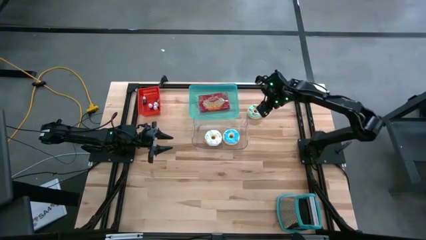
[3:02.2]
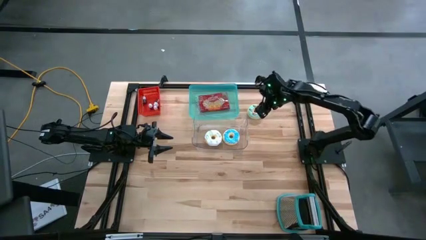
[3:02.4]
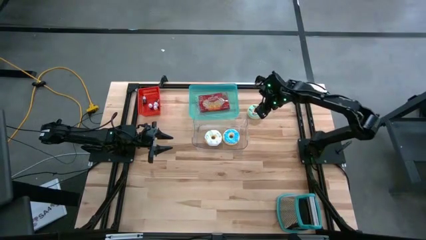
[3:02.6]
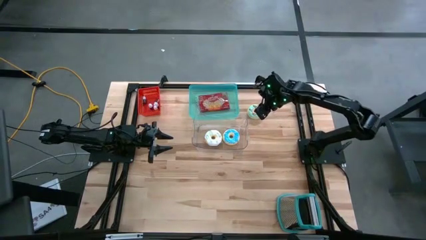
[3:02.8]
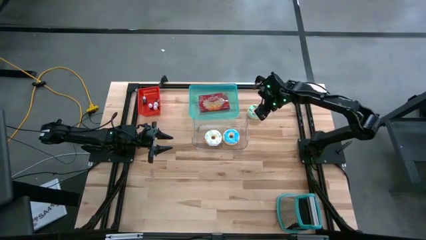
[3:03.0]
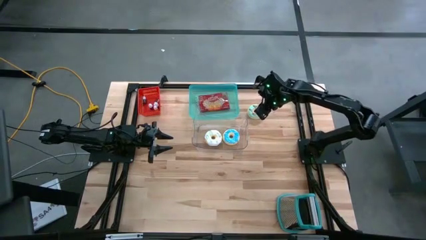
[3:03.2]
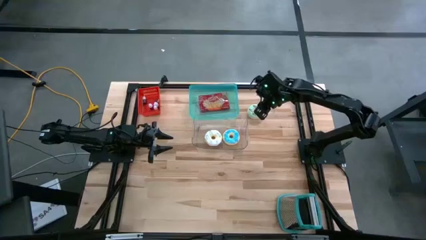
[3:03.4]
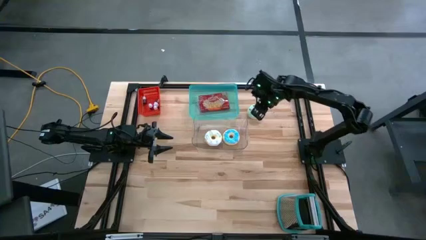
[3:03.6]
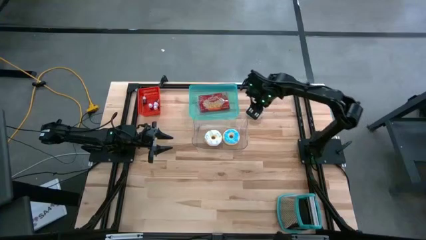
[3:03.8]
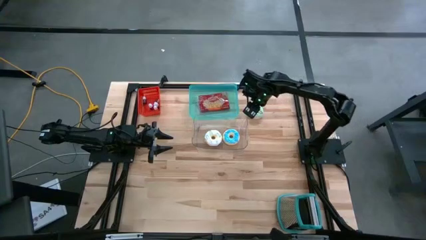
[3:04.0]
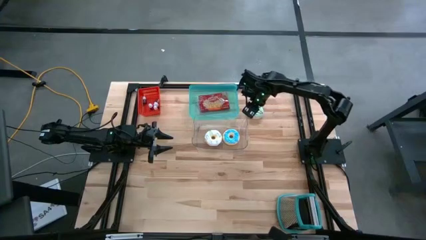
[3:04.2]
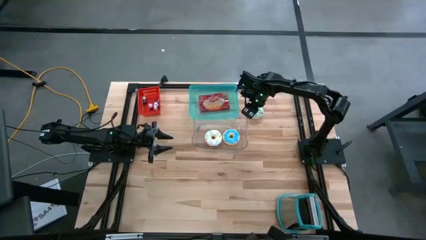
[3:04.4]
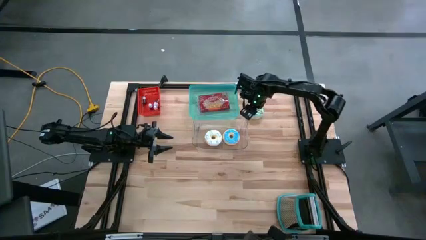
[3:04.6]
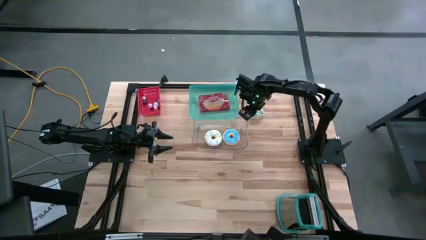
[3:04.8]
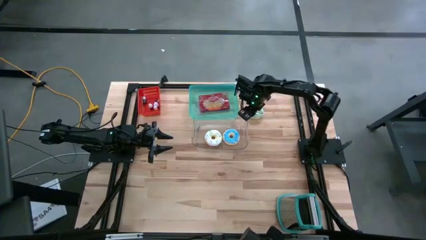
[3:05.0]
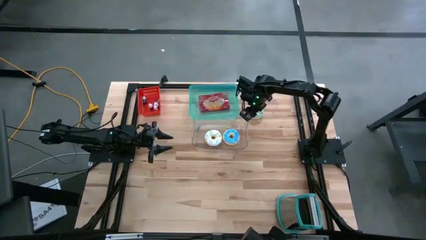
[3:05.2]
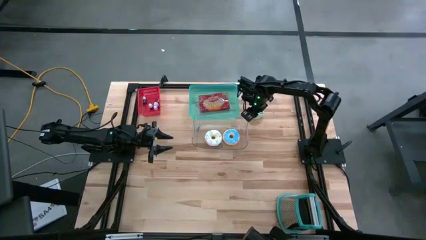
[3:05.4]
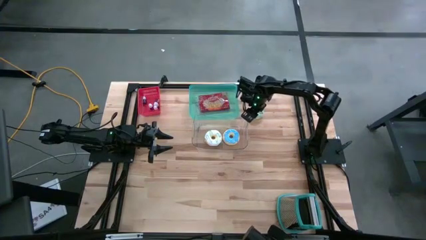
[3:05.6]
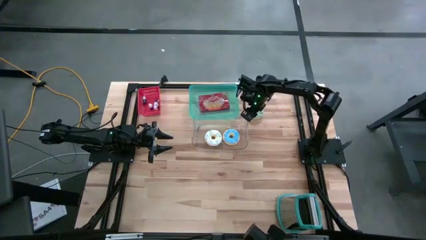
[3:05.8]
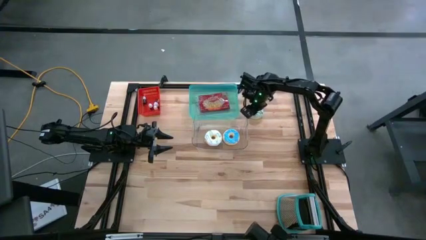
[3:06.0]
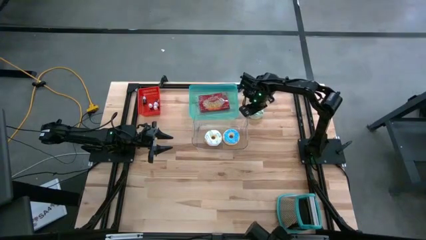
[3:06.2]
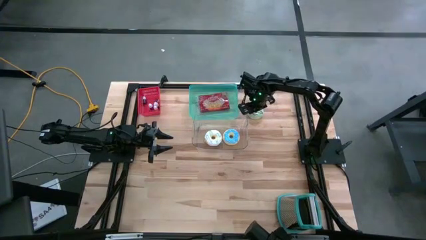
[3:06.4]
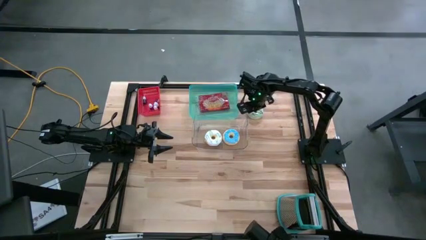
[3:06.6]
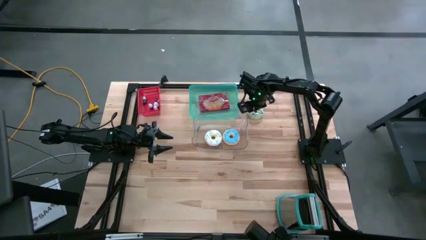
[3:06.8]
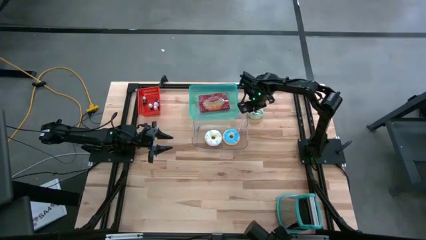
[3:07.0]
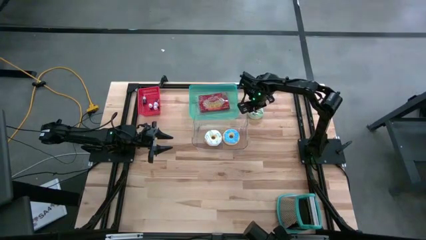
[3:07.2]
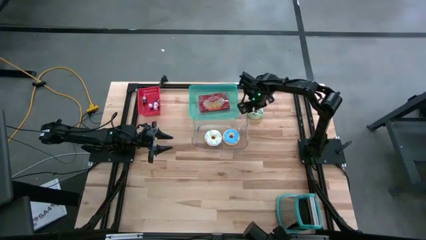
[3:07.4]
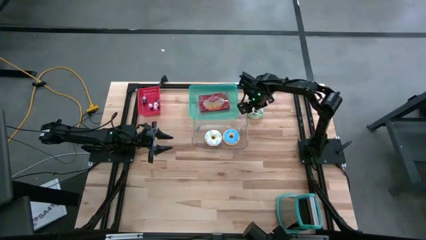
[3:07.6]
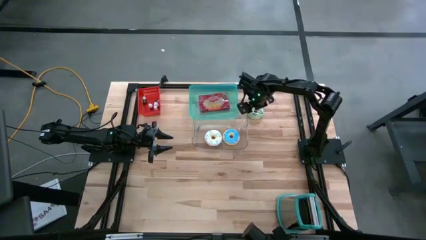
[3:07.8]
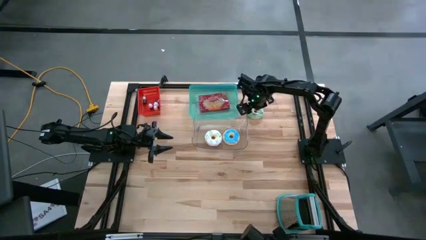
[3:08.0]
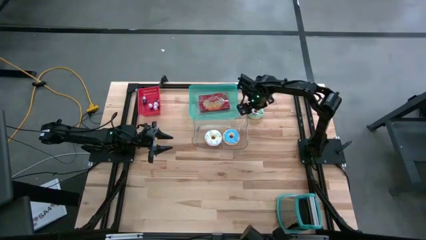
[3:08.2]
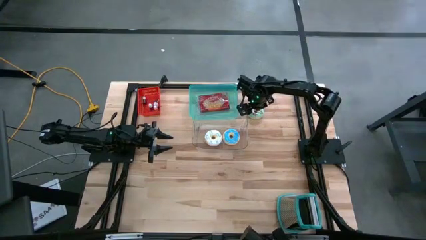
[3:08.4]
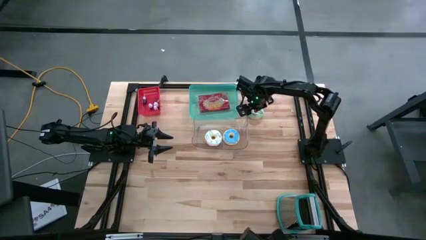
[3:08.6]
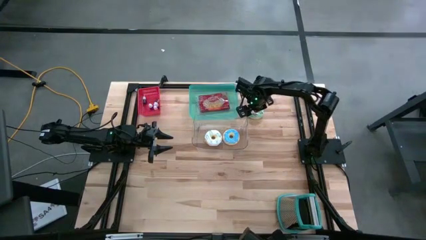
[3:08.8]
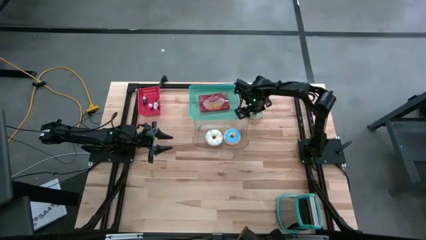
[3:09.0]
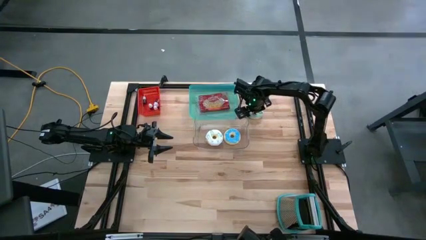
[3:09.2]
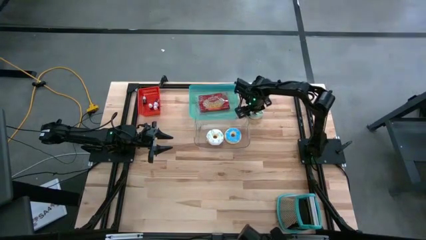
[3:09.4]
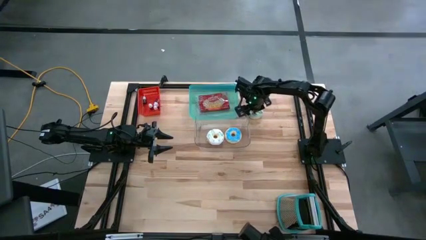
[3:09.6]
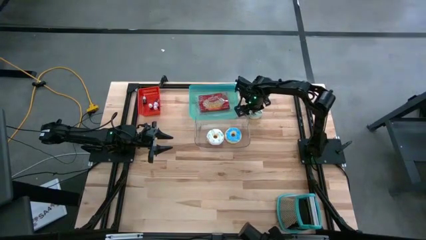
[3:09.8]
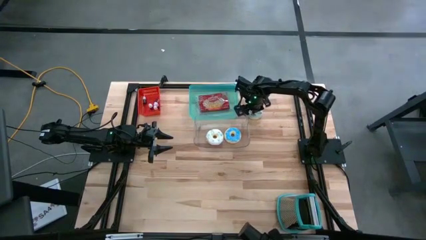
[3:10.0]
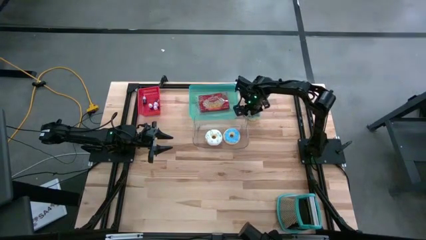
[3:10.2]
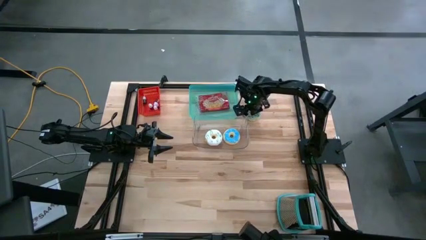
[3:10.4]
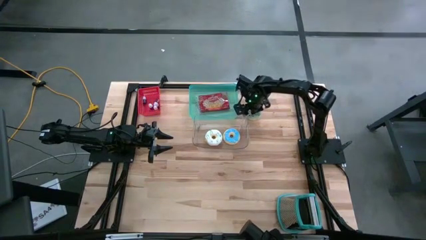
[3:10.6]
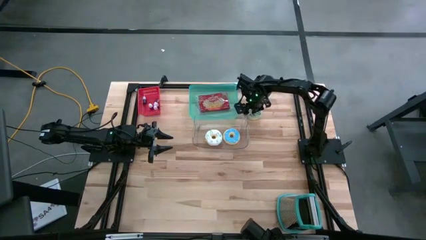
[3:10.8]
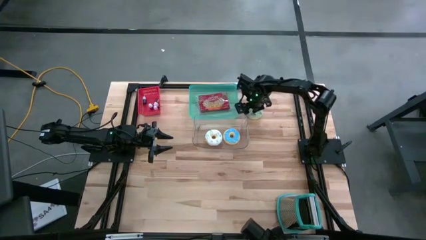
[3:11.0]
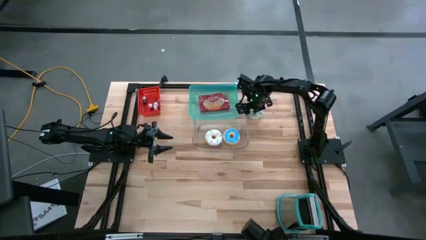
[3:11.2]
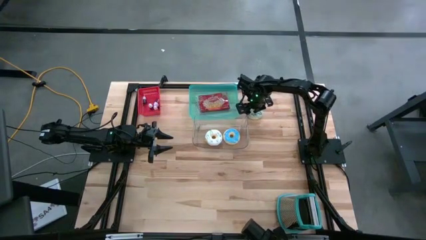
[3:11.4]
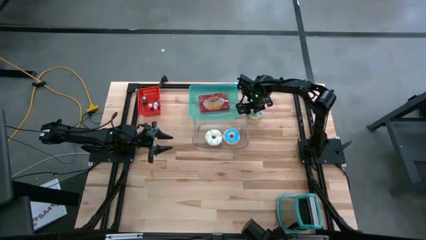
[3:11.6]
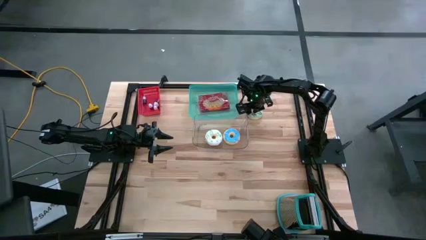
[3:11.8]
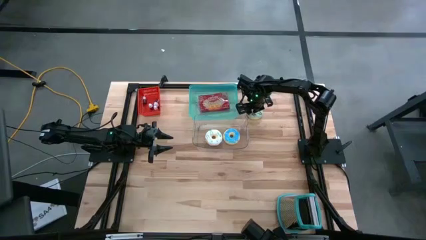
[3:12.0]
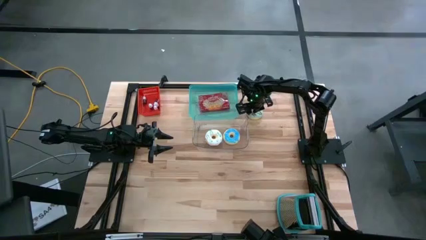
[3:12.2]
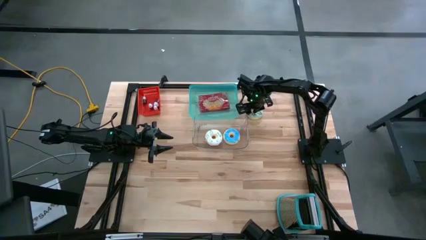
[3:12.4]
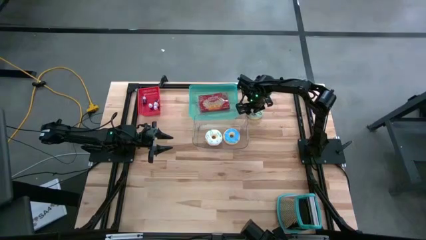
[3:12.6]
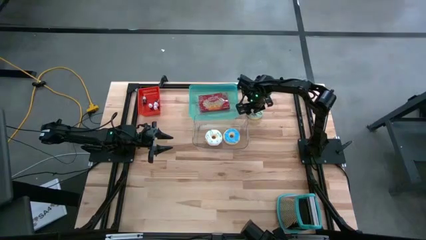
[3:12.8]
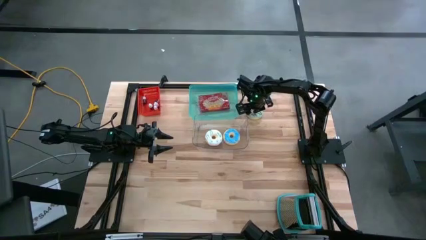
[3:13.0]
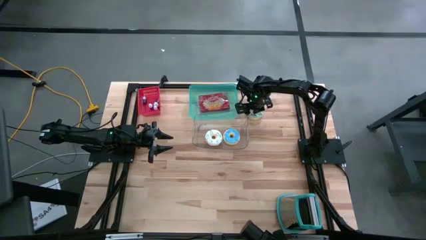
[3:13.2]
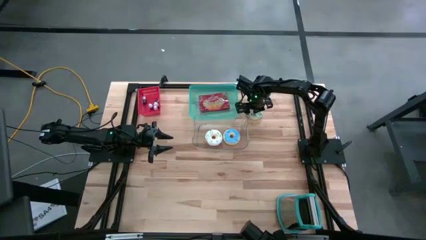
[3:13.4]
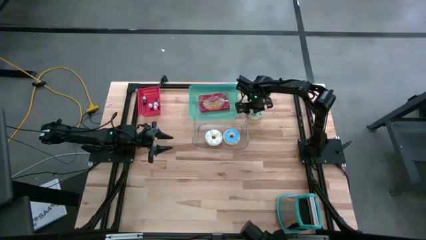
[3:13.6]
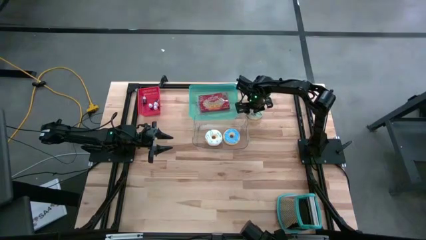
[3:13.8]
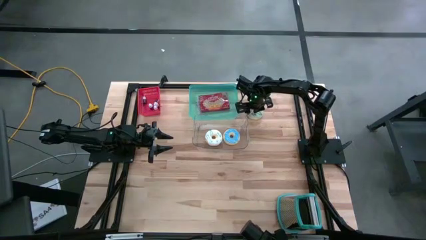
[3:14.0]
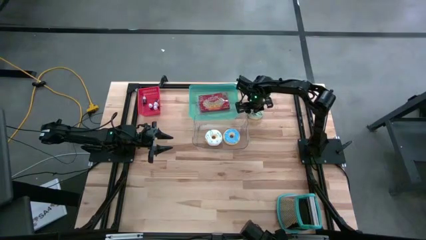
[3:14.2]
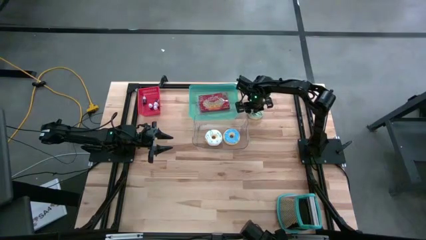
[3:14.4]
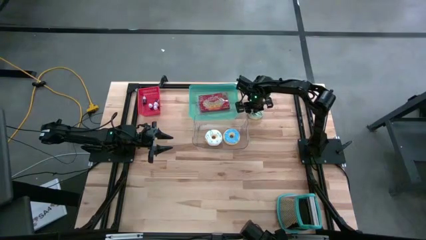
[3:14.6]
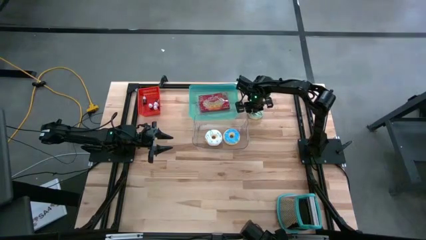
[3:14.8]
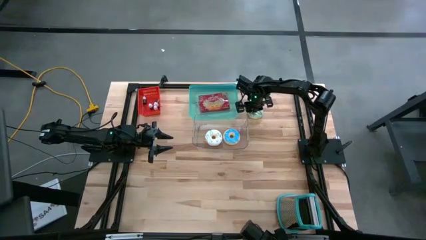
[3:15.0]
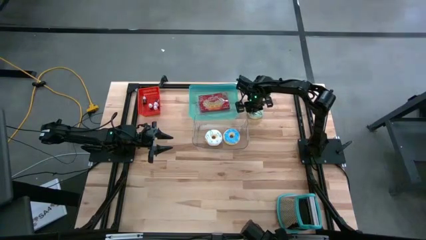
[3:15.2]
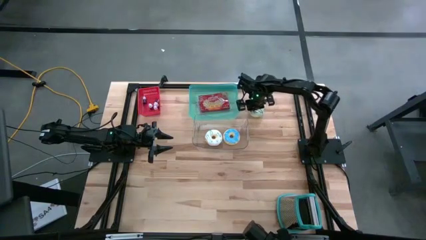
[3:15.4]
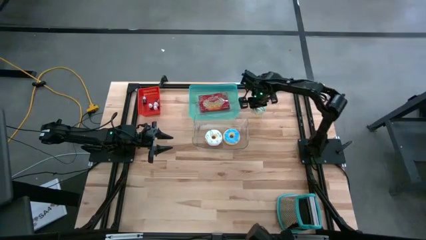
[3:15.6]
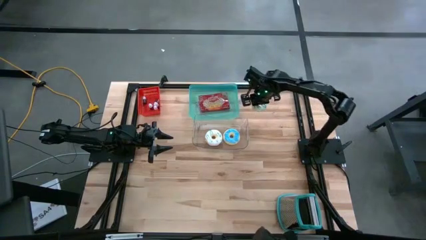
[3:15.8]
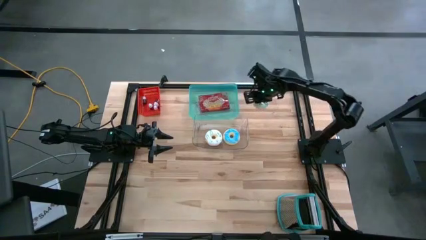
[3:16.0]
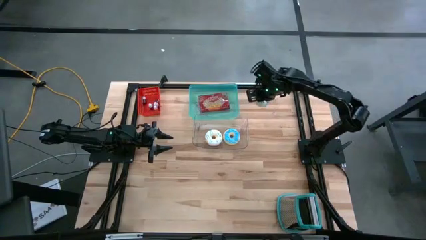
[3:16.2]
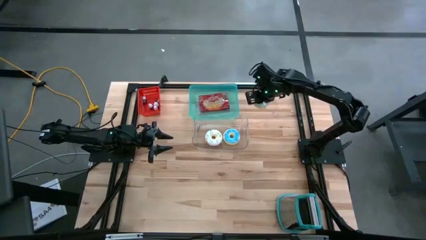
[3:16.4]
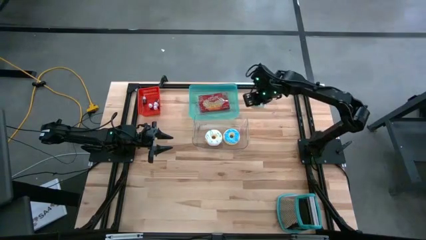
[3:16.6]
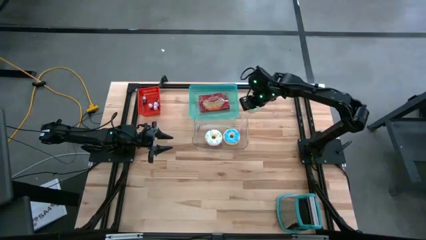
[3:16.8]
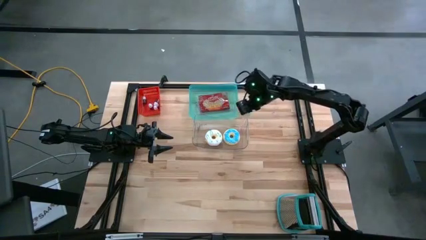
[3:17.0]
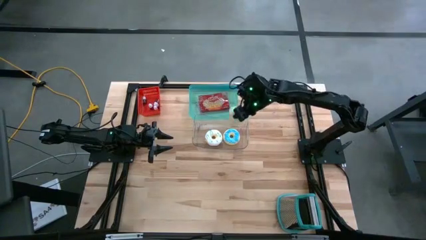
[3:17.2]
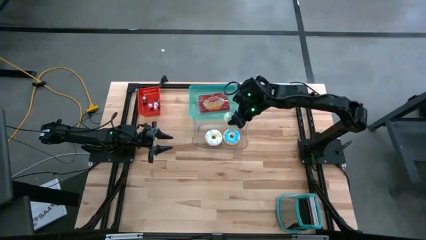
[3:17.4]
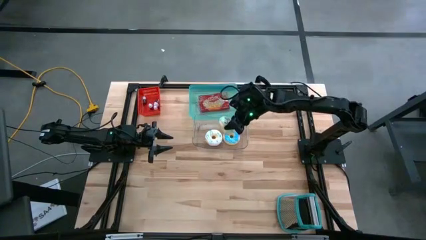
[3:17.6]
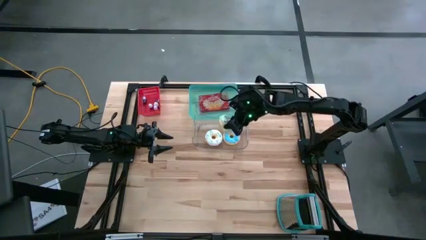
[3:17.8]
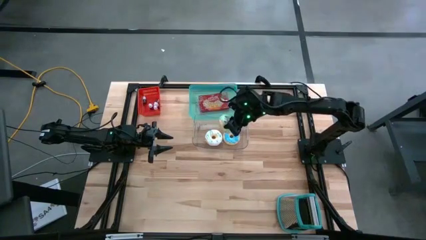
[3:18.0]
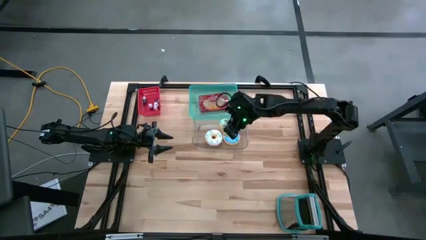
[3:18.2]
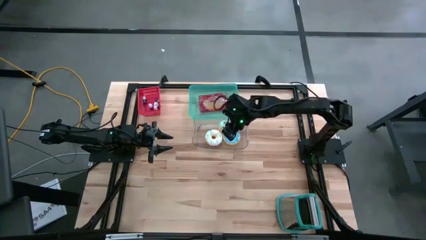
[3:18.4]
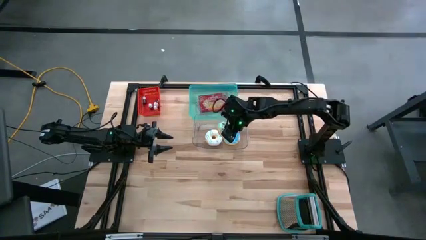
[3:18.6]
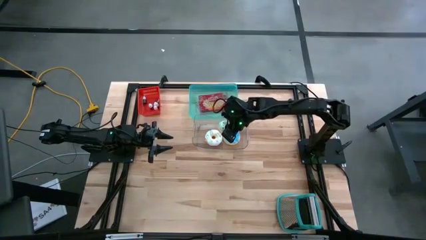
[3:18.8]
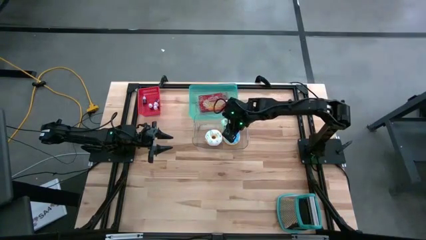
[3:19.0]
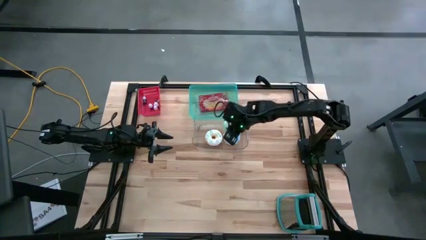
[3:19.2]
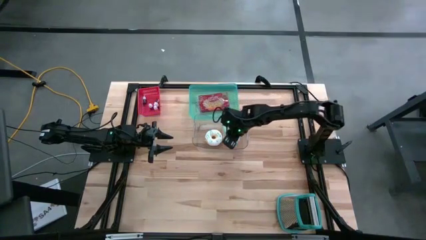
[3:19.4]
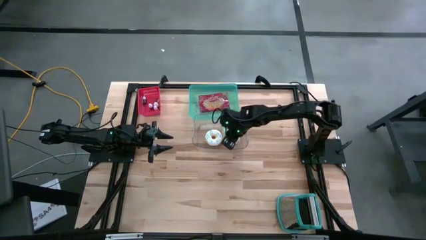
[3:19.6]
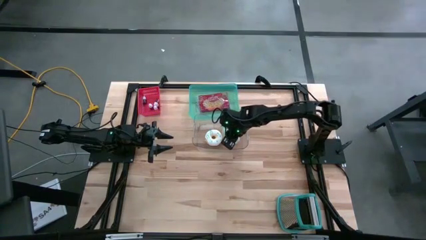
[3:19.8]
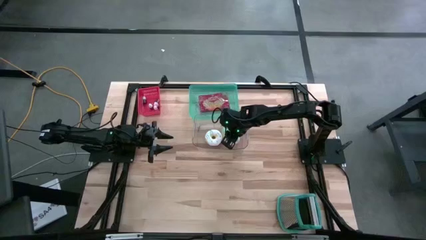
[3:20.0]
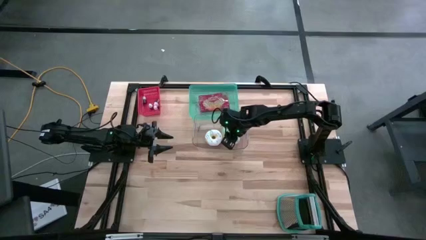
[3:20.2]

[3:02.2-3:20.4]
Put the green donut into the transparent bin
